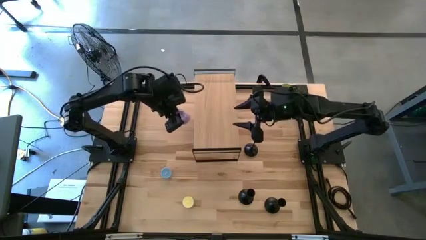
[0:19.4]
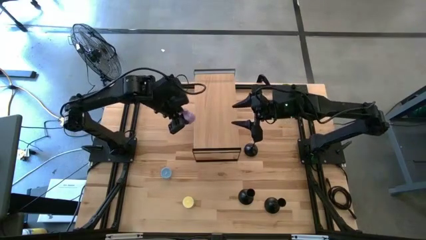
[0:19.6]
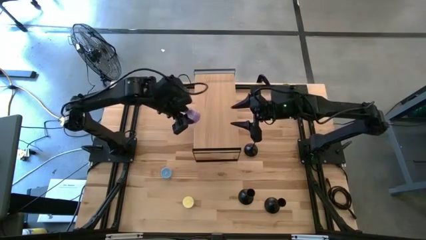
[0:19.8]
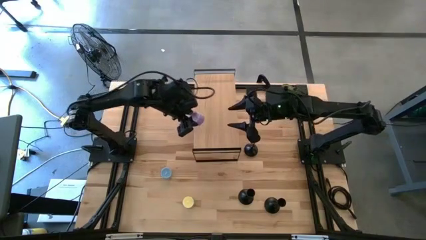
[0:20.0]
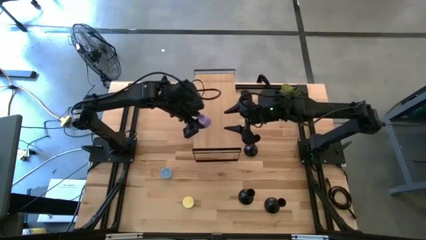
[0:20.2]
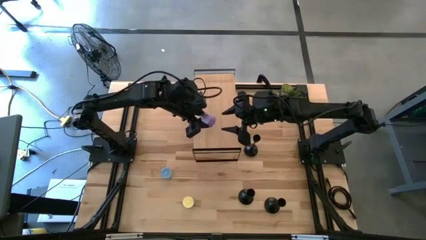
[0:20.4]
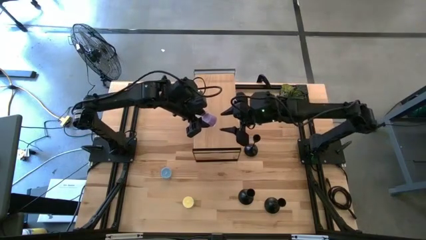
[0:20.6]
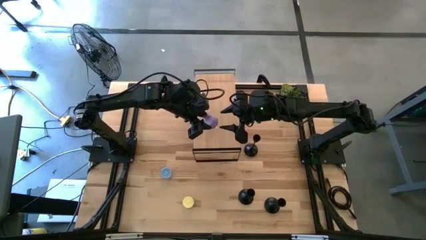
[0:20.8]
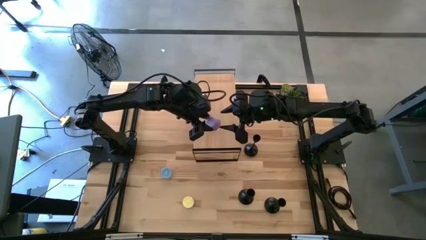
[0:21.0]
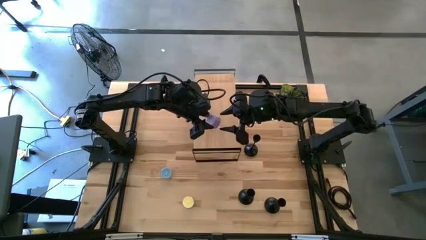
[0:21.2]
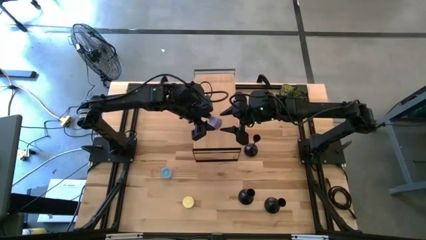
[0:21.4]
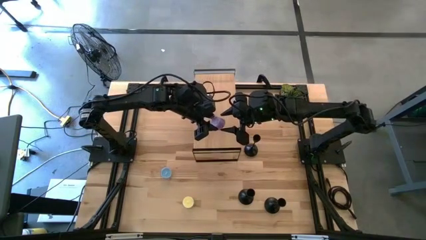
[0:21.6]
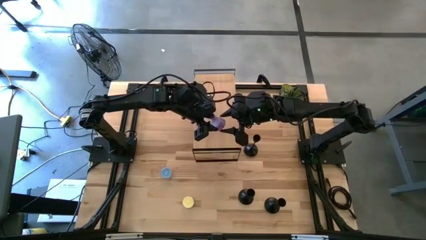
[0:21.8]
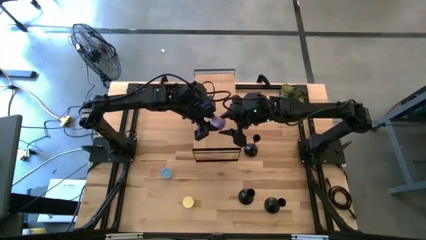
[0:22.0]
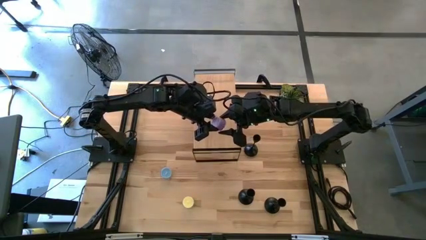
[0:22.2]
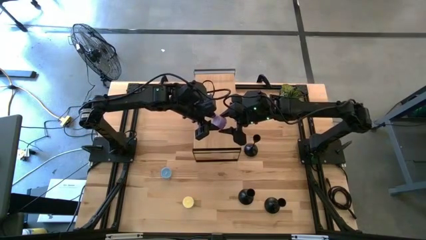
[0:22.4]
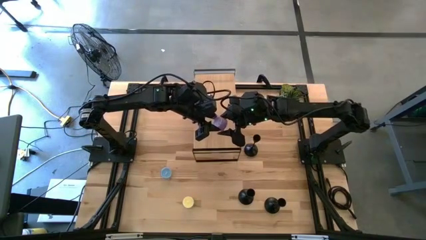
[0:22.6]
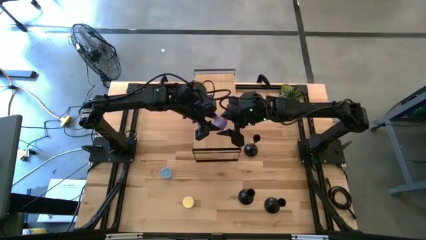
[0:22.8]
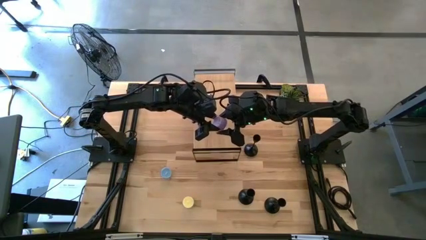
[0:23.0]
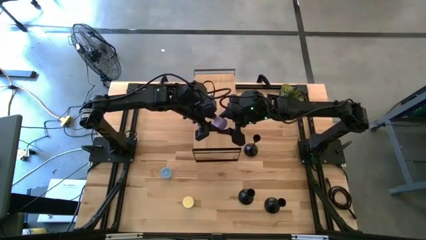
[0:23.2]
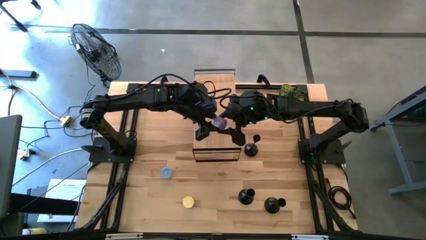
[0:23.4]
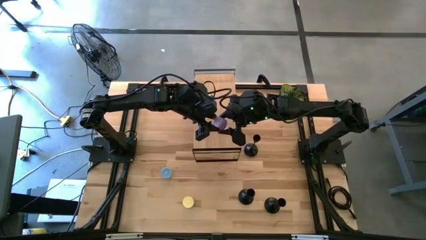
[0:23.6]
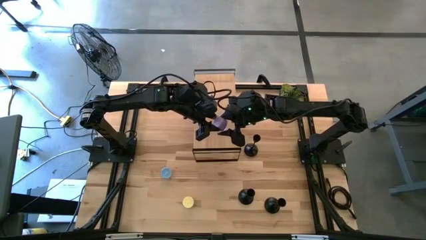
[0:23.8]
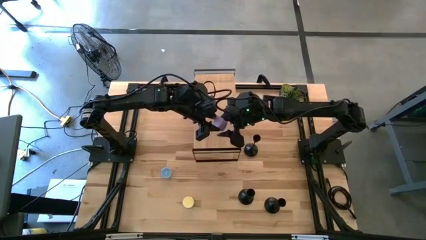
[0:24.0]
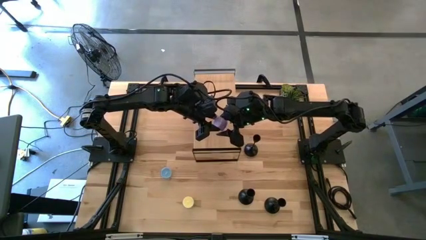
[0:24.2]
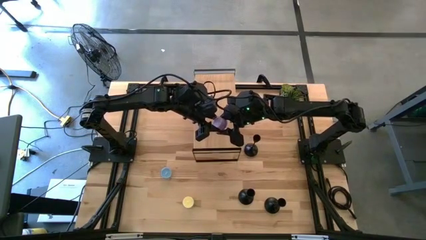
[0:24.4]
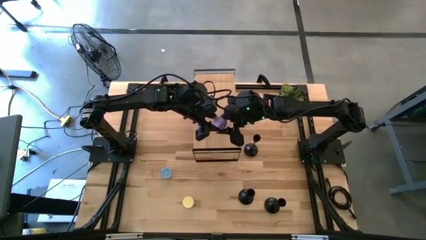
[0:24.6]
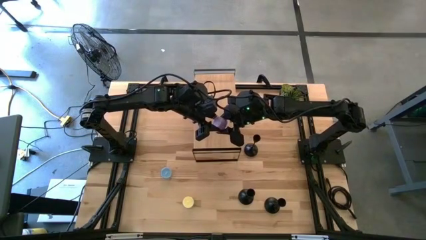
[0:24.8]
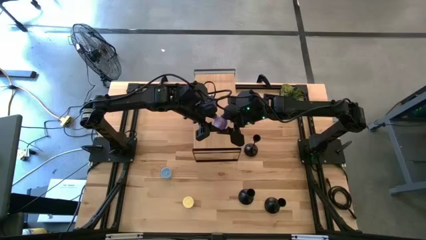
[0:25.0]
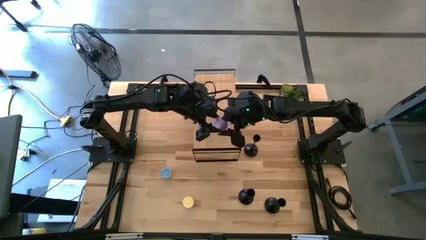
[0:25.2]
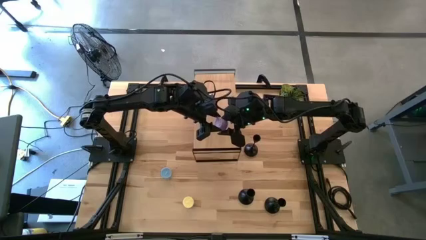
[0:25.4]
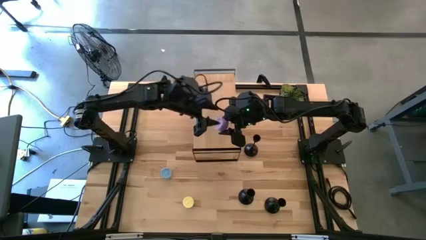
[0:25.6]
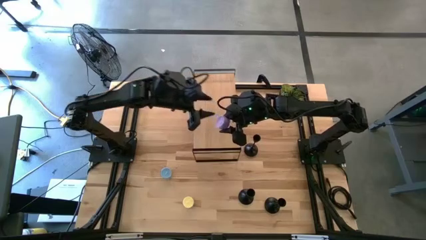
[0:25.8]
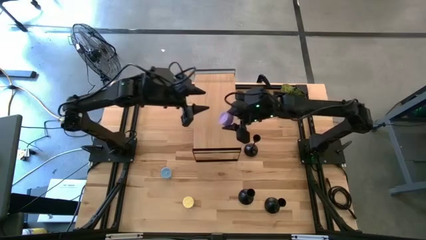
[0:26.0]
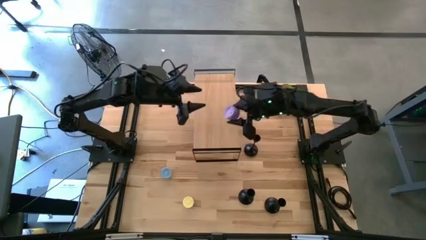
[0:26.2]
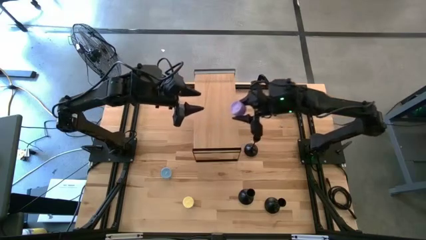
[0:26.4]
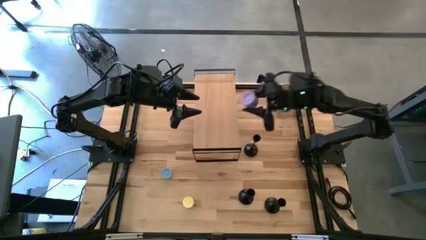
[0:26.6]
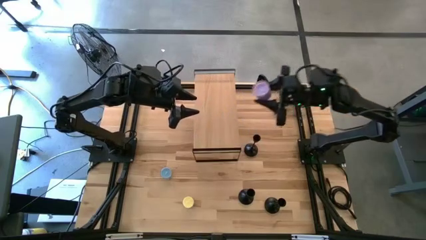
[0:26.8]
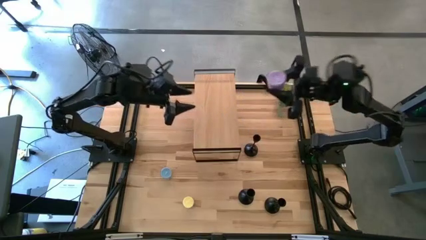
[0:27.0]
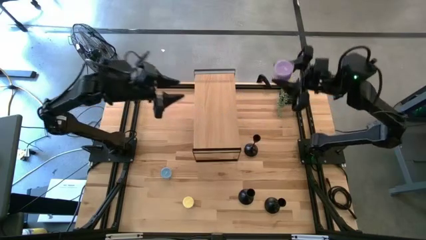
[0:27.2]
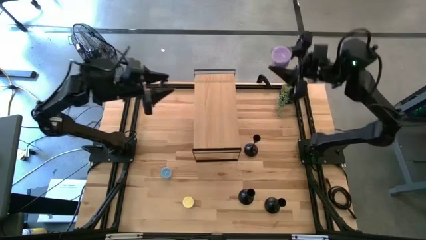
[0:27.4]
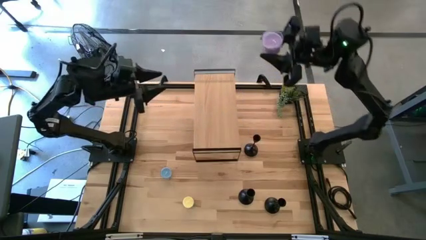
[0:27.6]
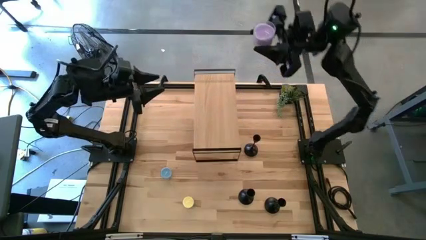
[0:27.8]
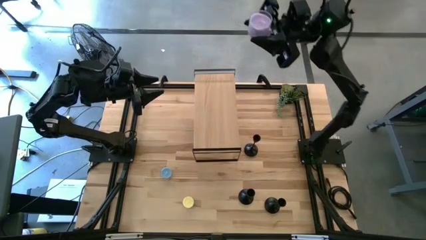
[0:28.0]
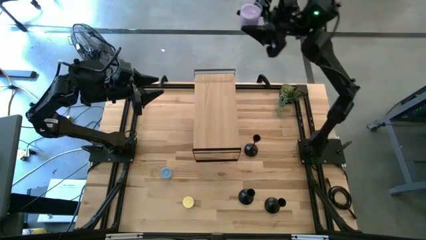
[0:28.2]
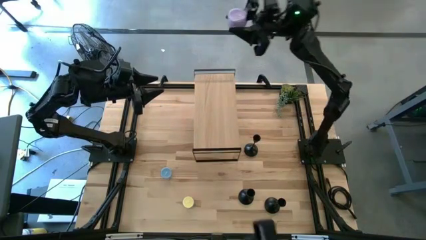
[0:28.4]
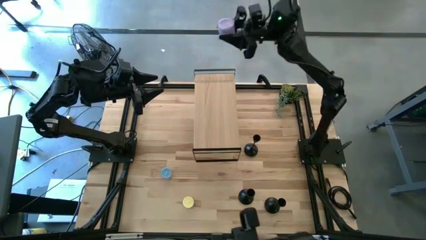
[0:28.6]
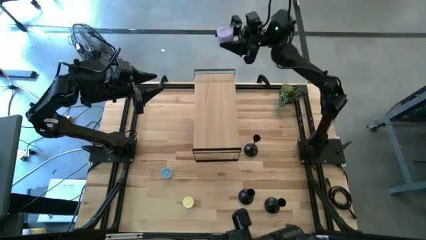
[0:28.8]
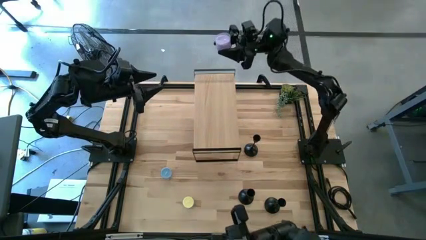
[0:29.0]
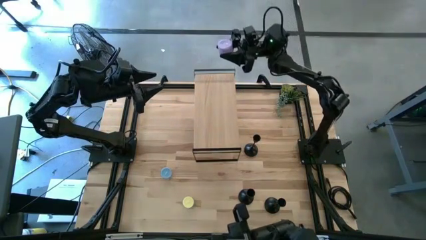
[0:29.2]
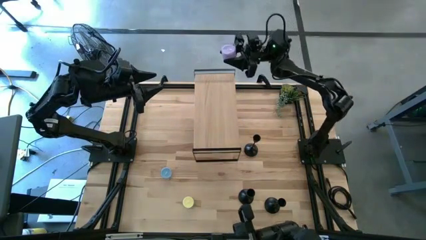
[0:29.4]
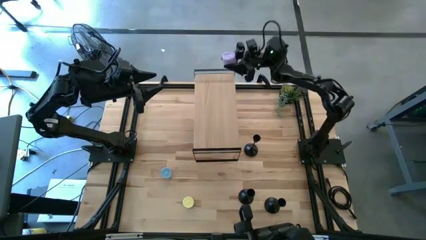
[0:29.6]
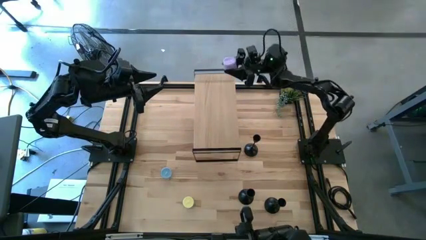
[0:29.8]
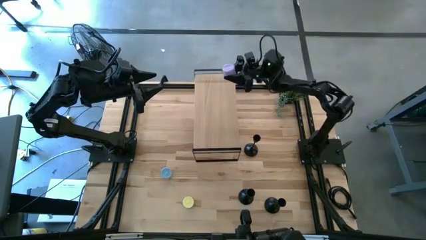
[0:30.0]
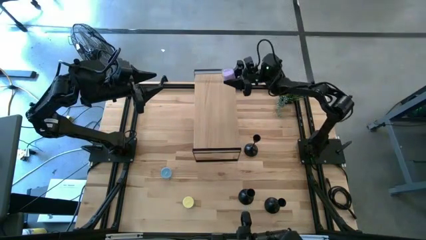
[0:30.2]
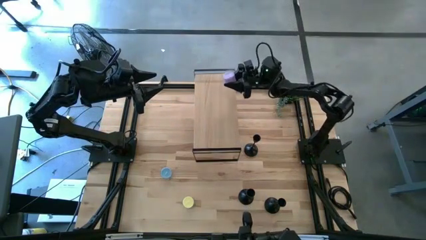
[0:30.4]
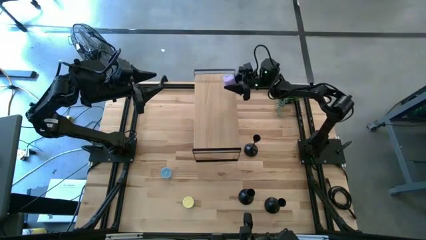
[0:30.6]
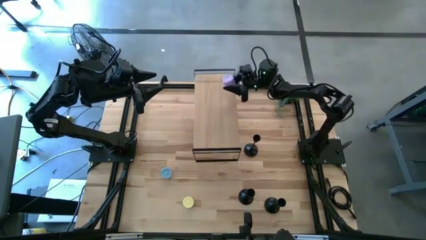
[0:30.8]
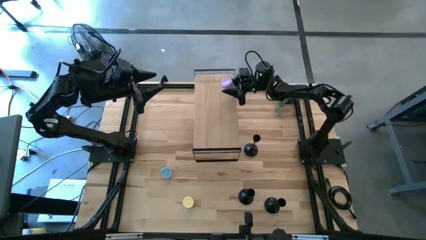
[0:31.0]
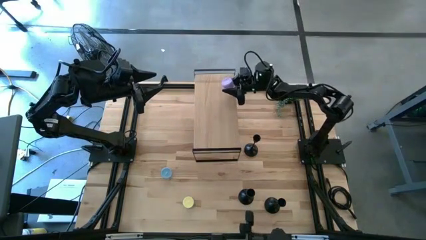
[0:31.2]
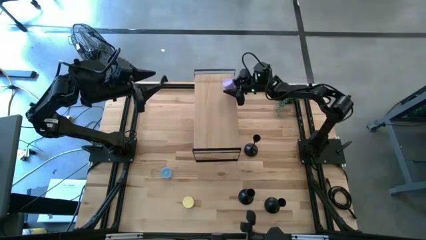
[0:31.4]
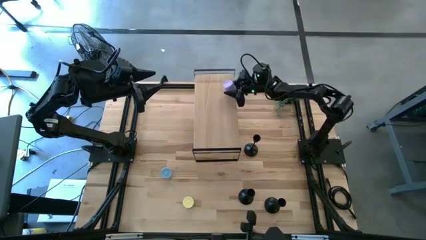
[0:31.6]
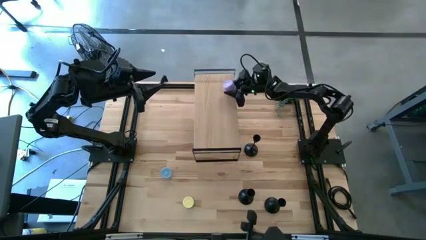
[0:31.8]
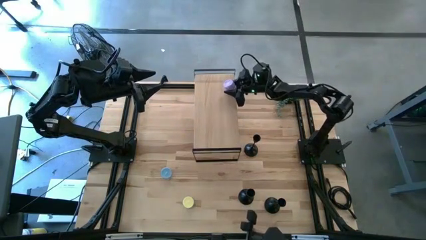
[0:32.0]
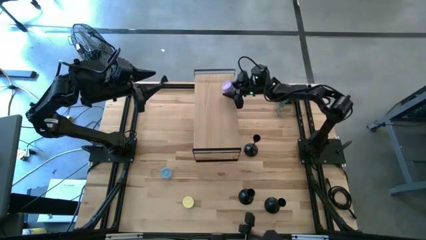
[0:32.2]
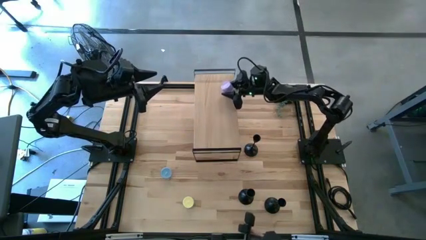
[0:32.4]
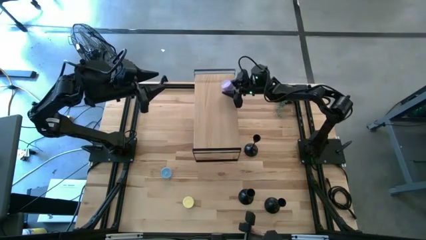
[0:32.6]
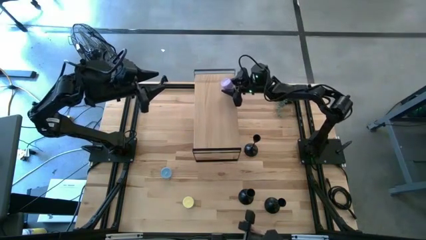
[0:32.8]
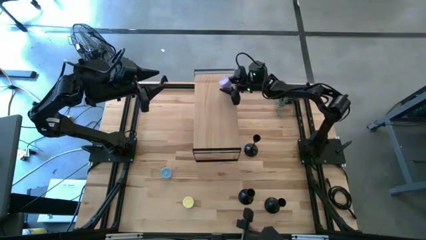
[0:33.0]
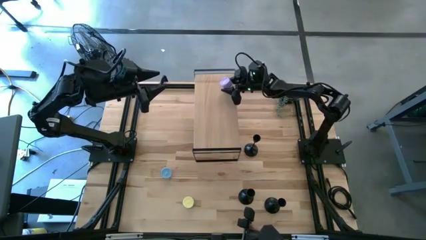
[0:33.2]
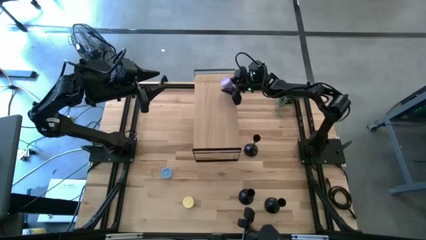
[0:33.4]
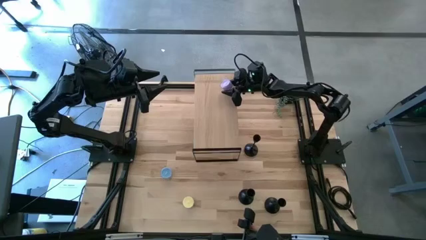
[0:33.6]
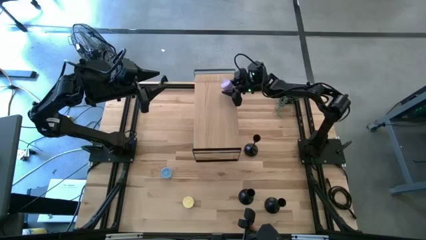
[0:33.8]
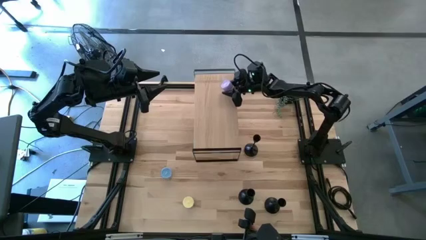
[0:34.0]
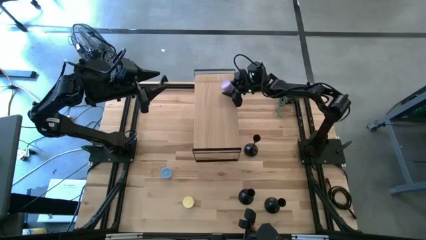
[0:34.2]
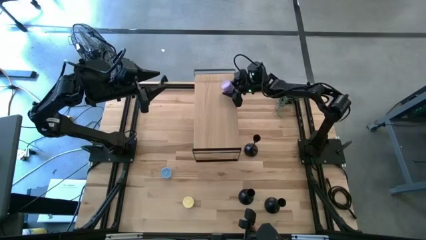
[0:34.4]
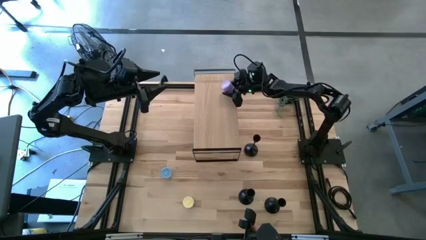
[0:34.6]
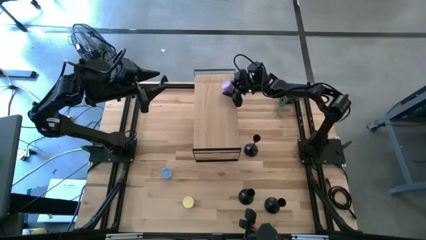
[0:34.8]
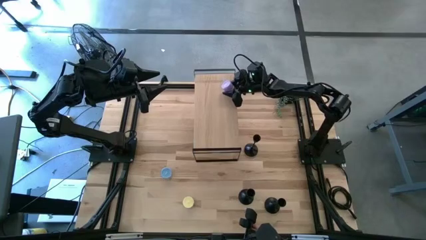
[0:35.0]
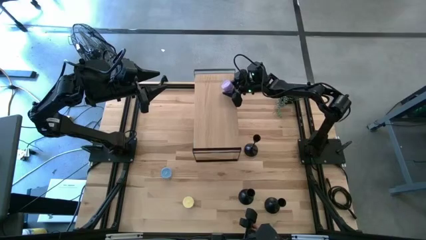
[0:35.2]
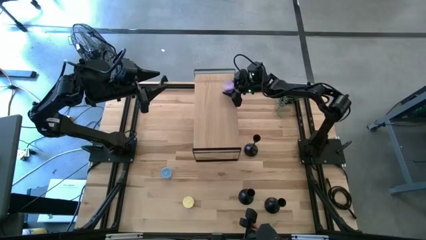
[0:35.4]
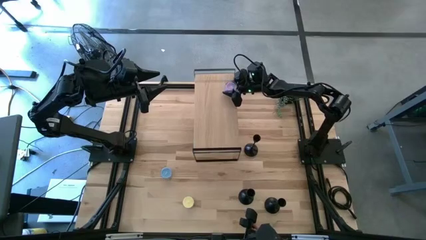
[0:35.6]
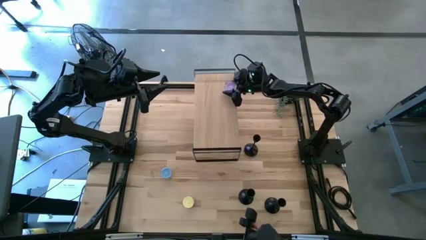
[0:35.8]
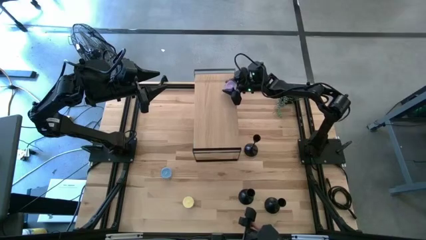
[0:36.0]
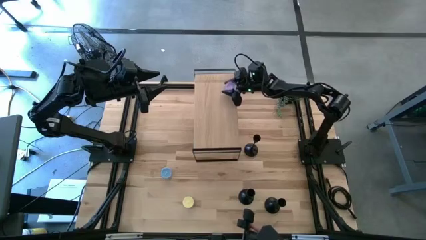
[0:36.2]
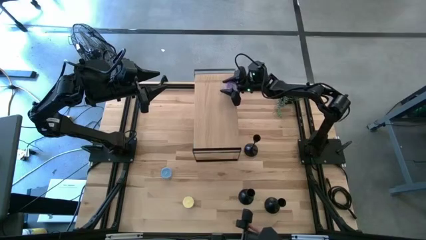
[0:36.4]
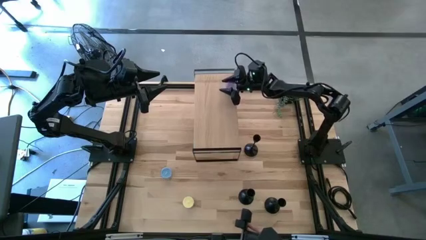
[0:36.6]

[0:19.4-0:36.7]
Task: Pick & Place candle stick holders
Put the purple scented candle on the shelf
